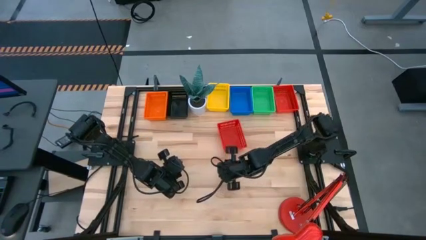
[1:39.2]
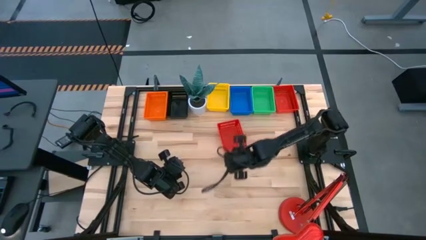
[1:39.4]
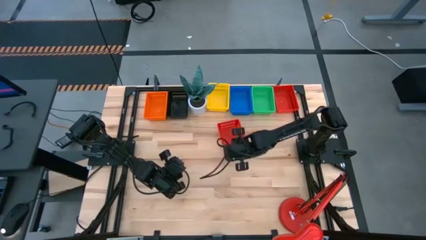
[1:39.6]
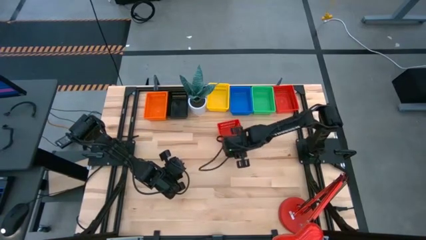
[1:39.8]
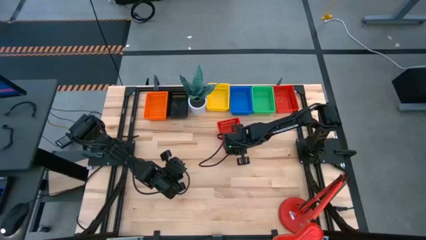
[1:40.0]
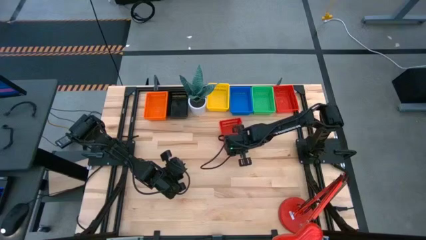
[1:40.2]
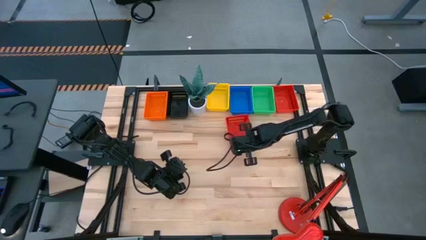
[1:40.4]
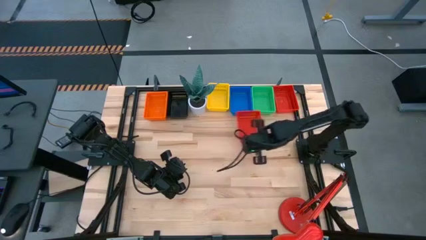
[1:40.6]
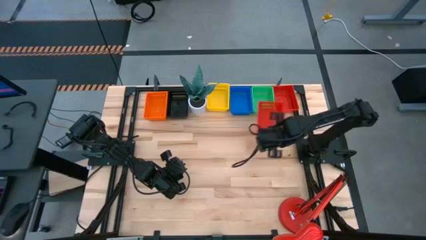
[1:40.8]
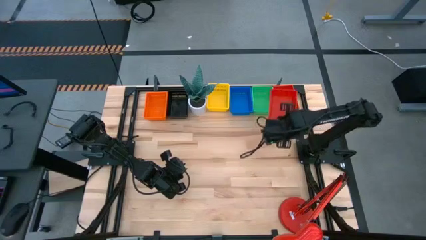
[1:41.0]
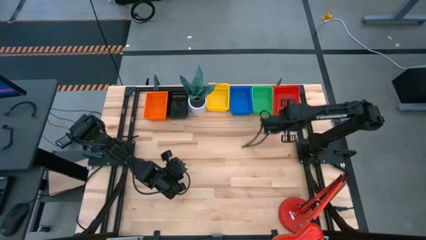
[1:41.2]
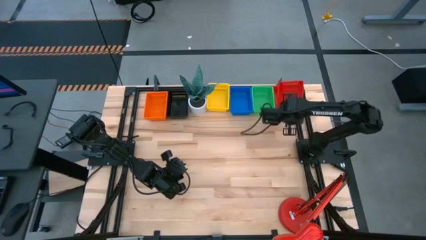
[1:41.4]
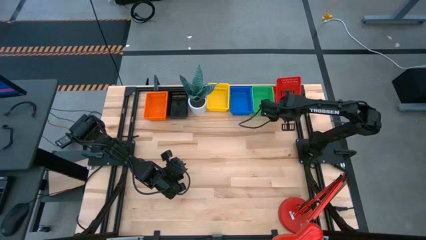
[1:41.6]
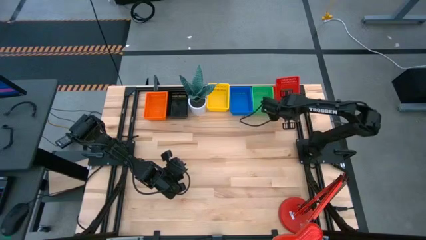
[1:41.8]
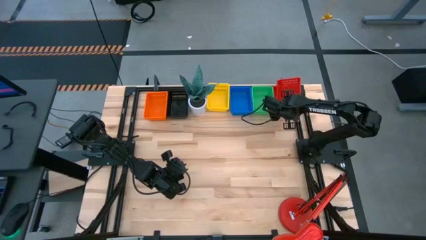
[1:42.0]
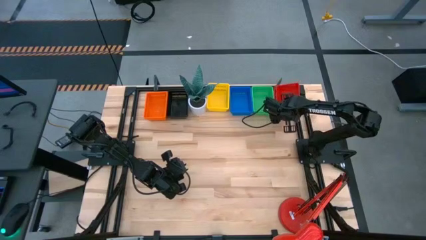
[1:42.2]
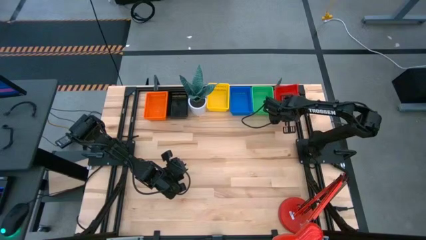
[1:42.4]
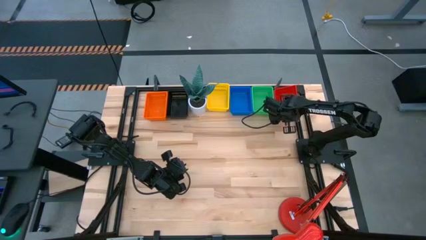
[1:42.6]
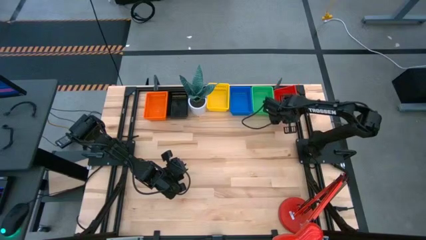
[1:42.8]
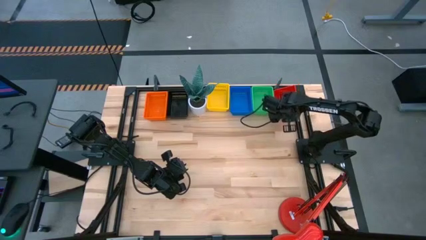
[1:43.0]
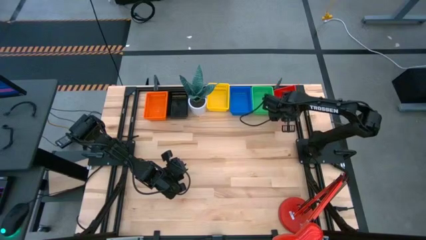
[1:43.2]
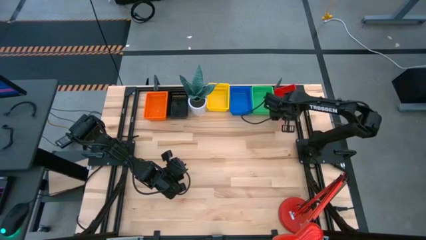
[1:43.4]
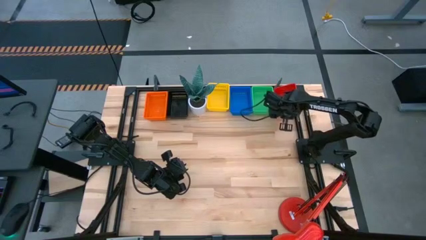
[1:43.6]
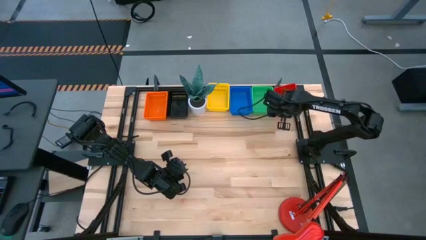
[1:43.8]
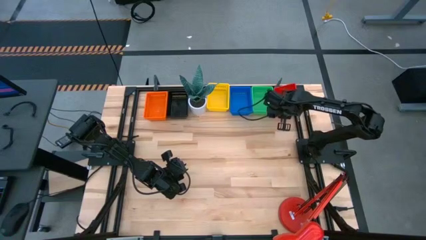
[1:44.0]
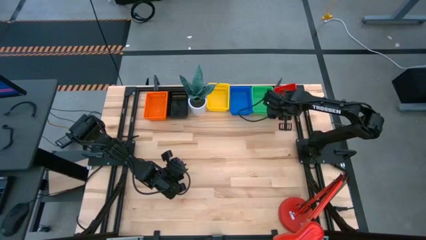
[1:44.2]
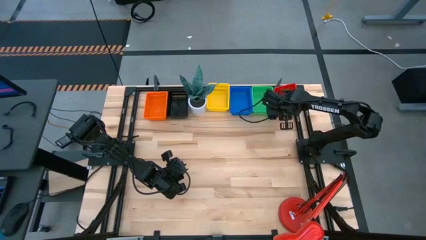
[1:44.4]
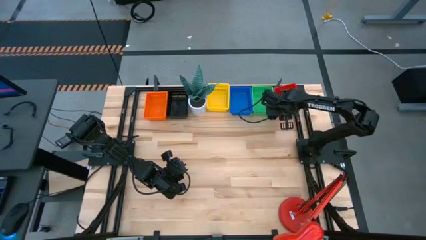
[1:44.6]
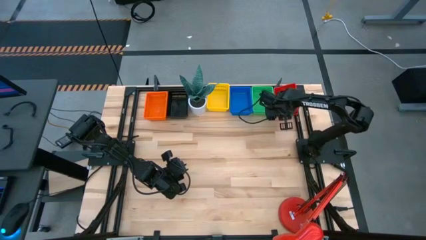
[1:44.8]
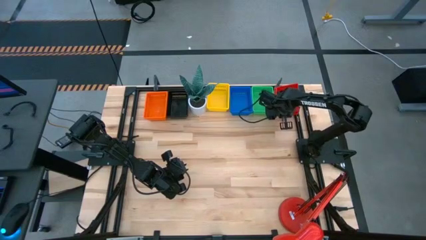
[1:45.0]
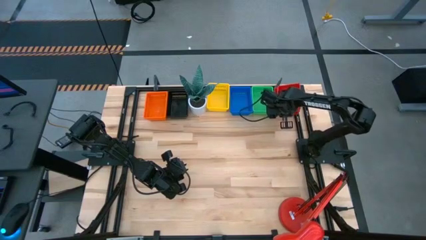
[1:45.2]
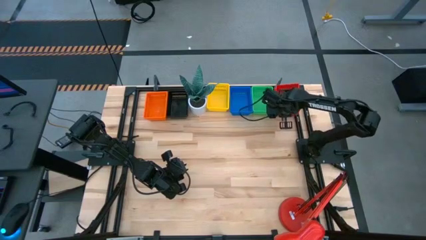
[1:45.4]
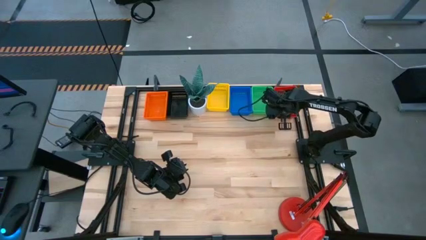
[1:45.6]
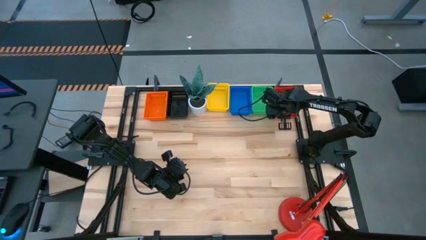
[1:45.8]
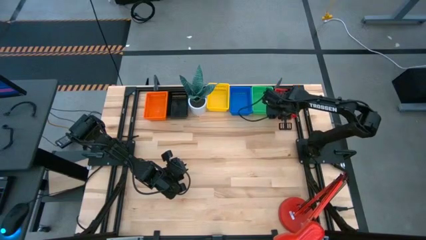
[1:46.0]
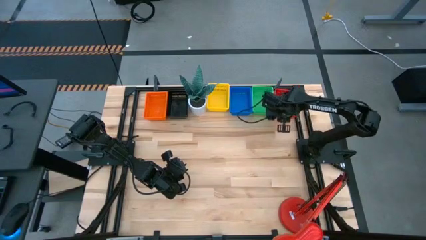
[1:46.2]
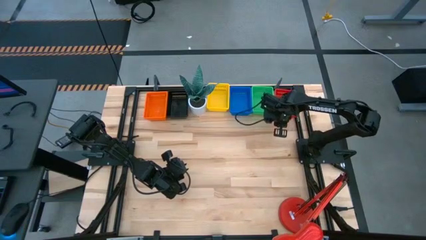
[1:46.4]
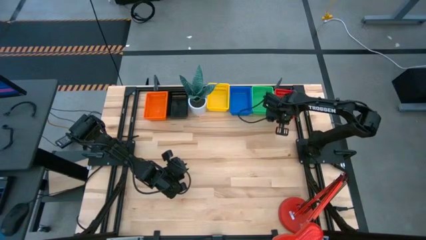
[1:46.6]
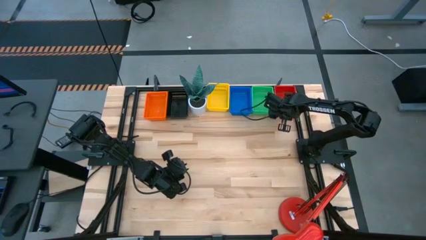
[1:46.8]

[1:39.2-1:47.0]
Stack the bottom red bin on the top red bin

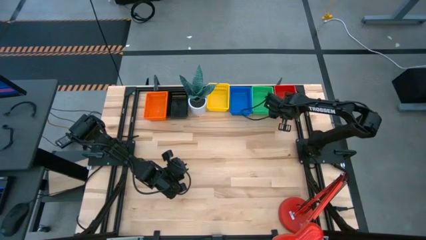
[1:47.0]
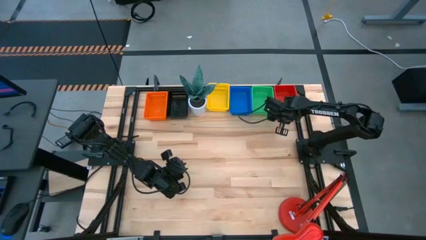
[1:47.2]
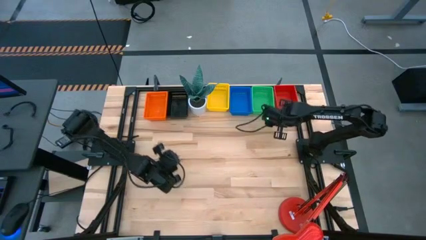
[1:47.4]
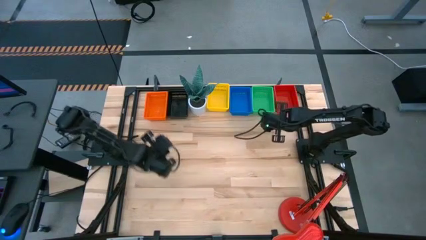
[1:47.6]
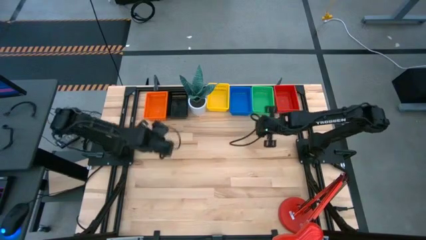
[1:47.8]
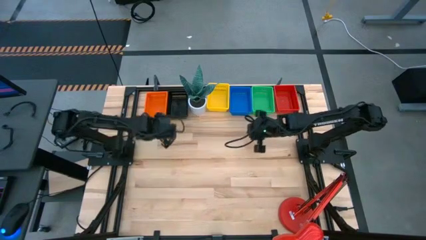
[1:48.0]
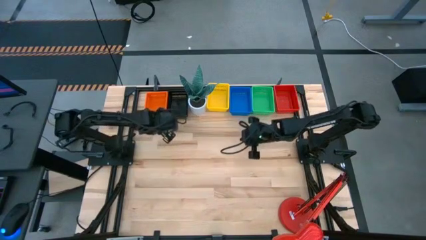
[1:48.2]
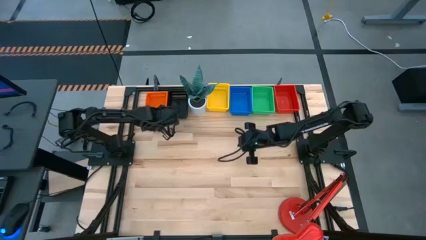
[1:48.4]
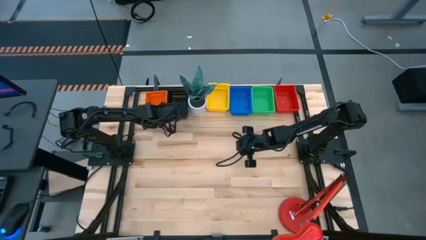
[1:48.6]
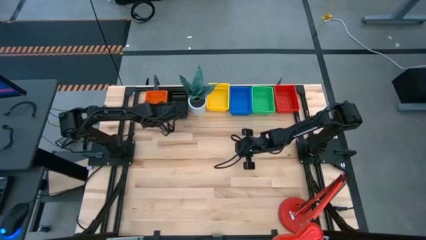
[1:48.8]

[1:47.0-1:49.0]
Adjust the stacked orange bins

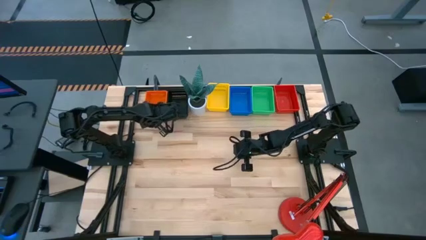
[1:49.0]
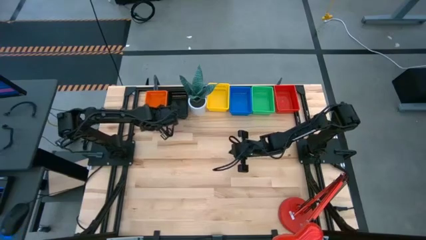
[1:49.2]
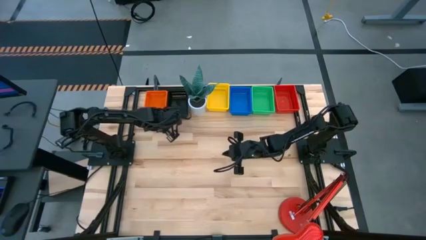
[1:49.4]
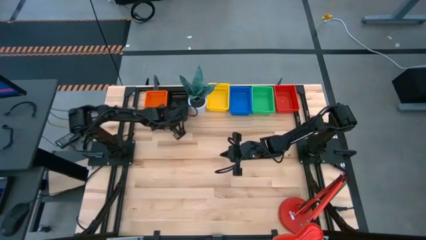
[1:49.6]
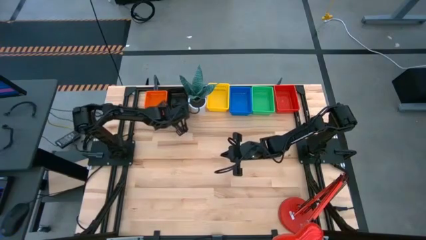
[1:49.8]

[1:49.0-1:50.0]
Adjust the stacked black bins
